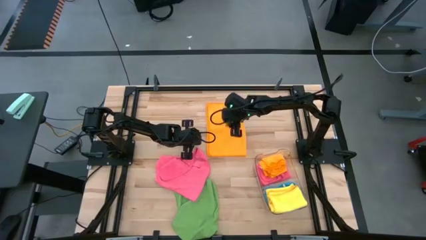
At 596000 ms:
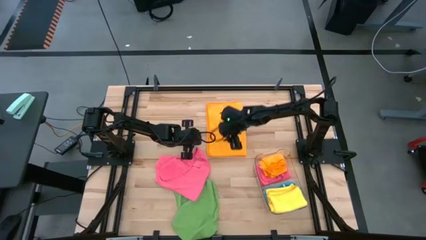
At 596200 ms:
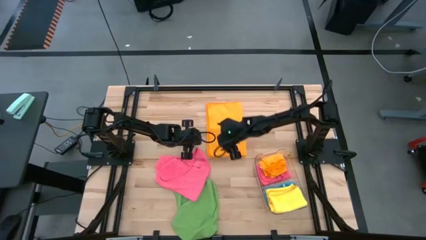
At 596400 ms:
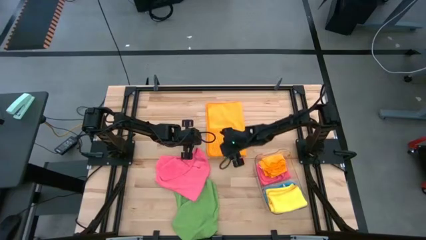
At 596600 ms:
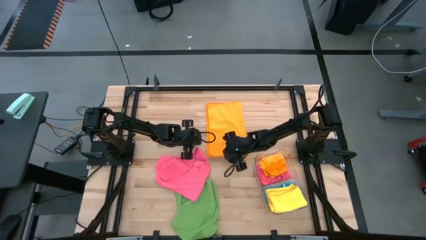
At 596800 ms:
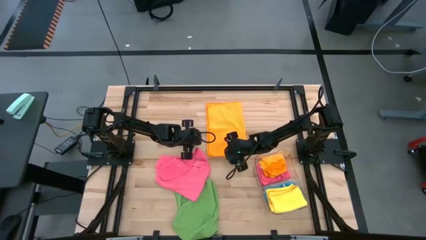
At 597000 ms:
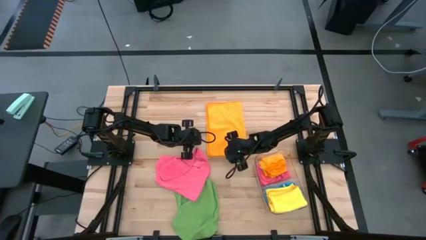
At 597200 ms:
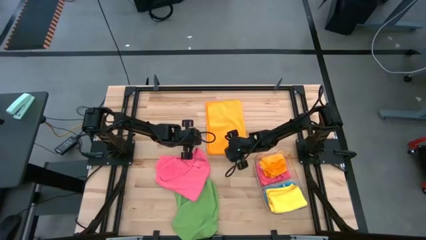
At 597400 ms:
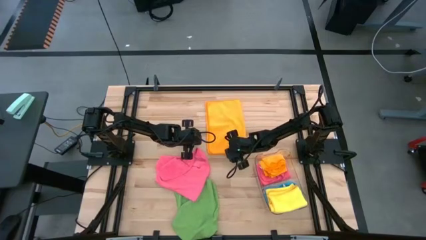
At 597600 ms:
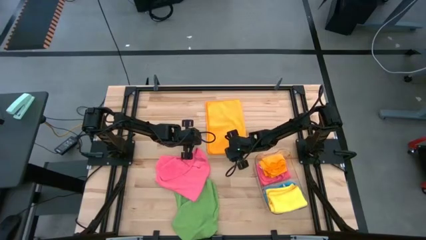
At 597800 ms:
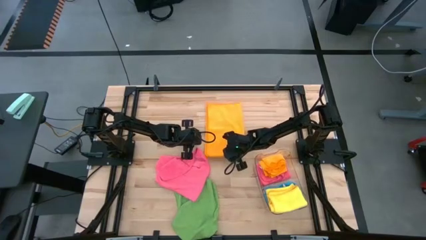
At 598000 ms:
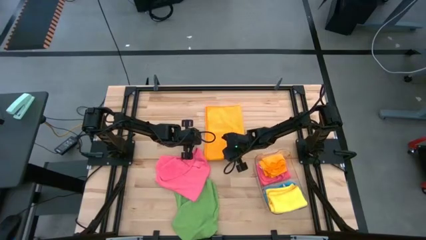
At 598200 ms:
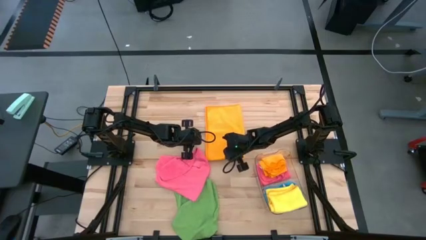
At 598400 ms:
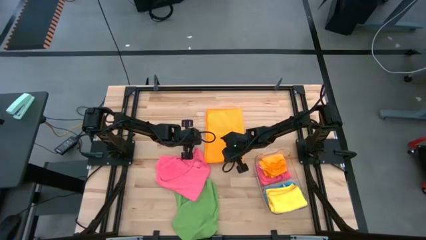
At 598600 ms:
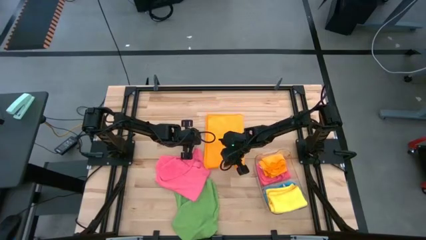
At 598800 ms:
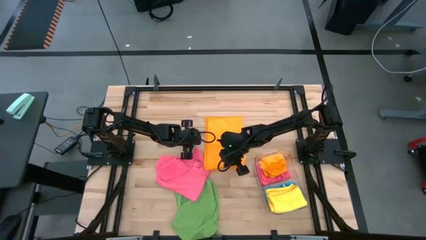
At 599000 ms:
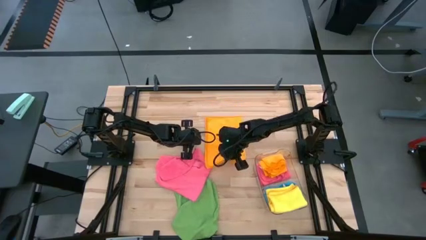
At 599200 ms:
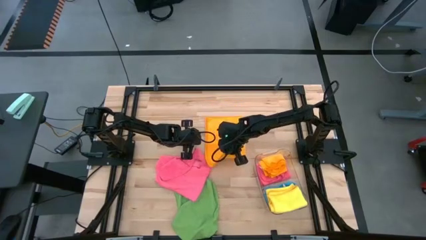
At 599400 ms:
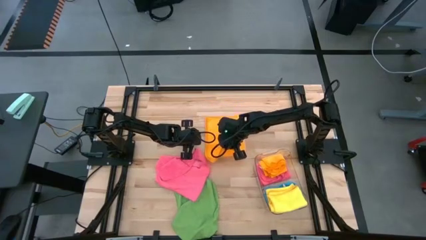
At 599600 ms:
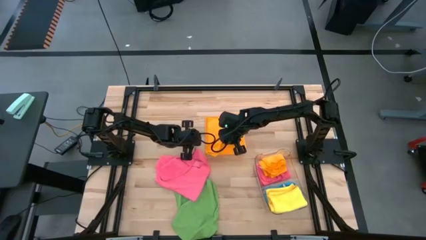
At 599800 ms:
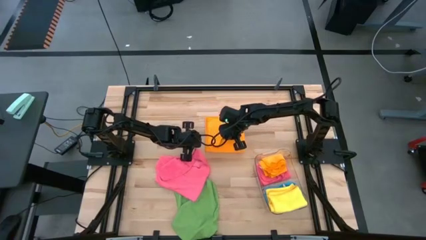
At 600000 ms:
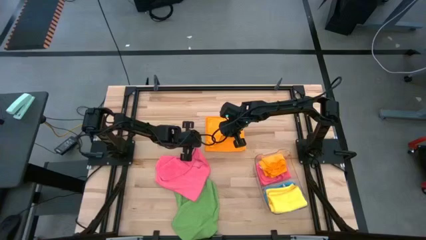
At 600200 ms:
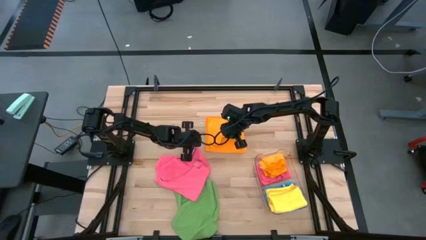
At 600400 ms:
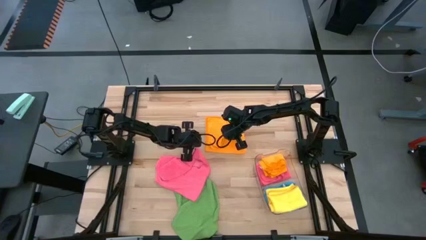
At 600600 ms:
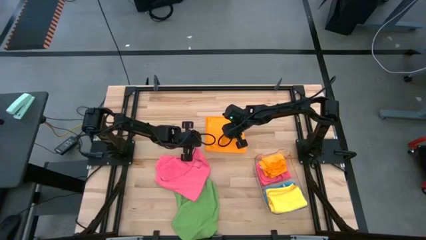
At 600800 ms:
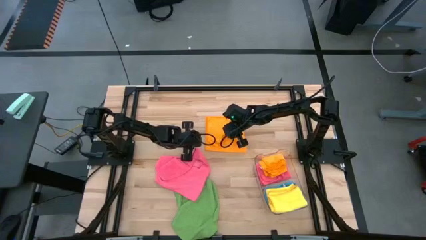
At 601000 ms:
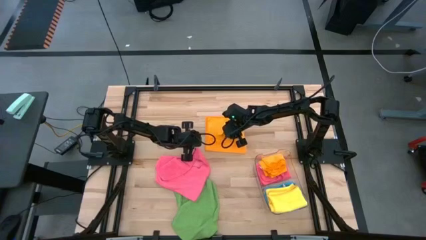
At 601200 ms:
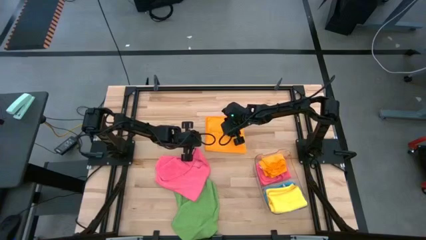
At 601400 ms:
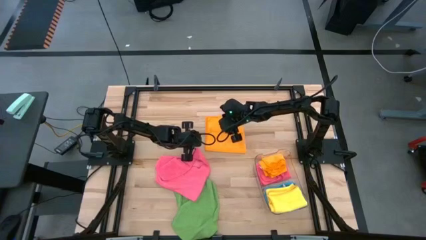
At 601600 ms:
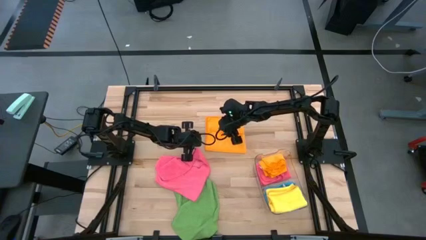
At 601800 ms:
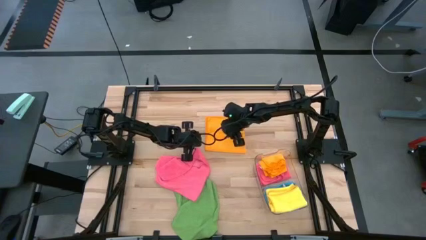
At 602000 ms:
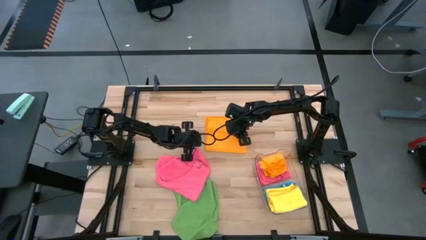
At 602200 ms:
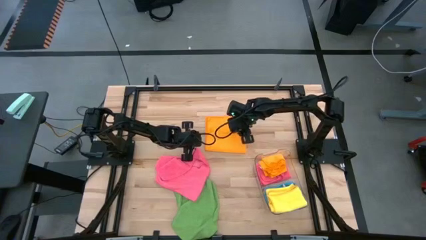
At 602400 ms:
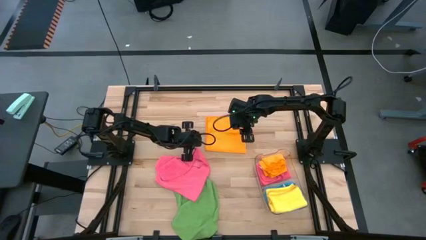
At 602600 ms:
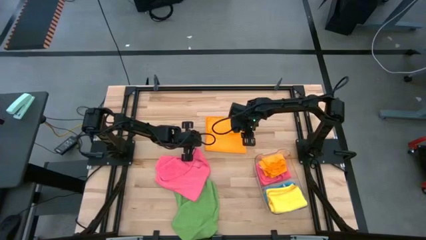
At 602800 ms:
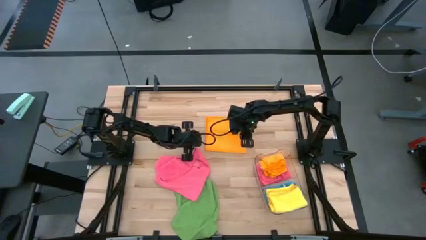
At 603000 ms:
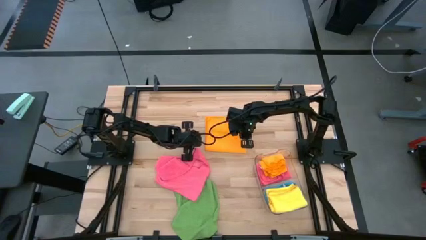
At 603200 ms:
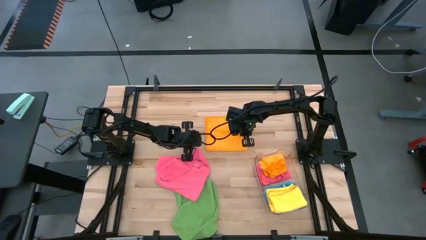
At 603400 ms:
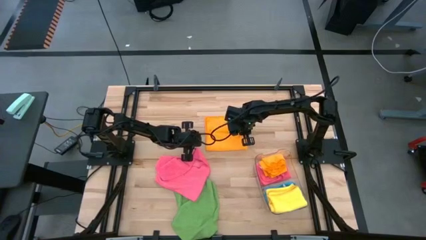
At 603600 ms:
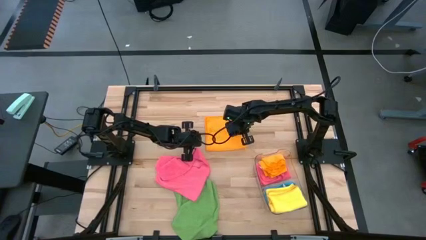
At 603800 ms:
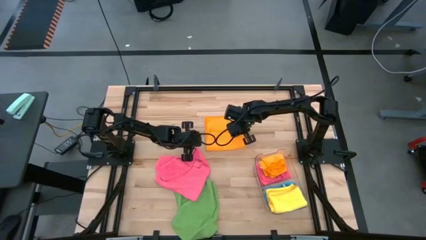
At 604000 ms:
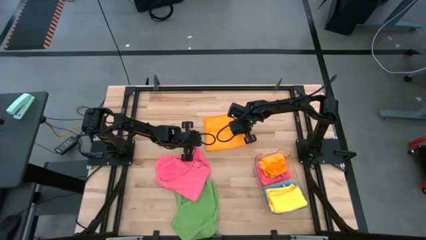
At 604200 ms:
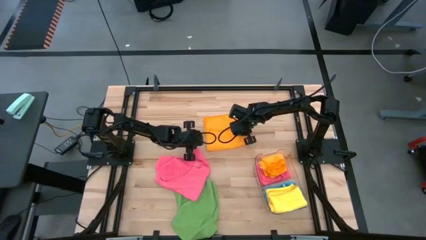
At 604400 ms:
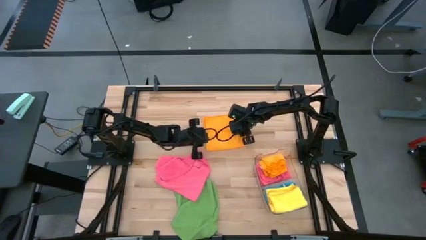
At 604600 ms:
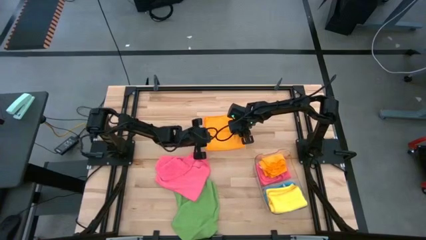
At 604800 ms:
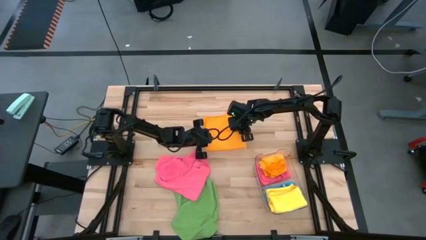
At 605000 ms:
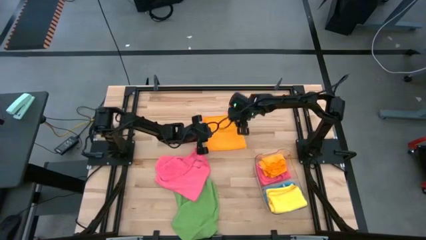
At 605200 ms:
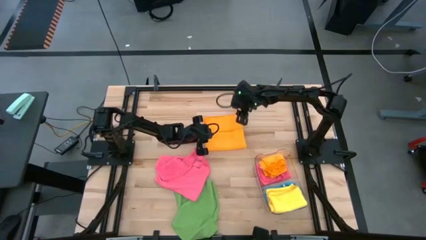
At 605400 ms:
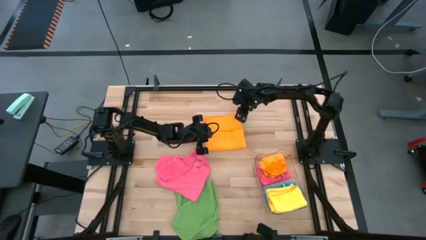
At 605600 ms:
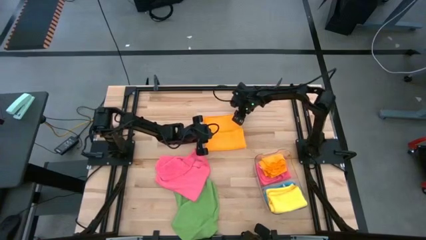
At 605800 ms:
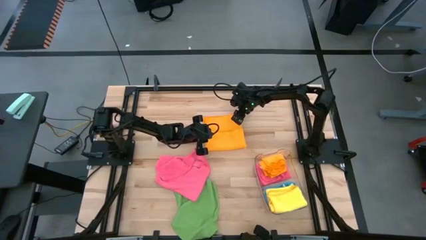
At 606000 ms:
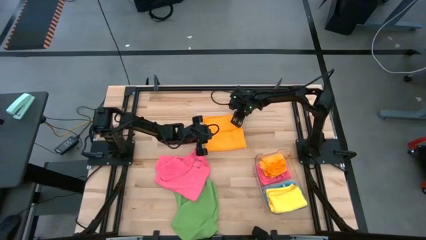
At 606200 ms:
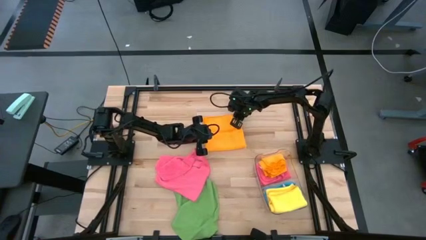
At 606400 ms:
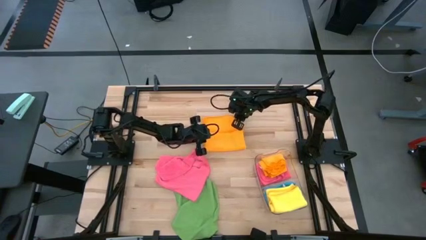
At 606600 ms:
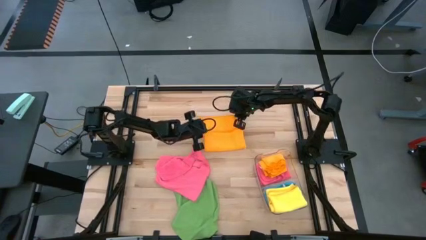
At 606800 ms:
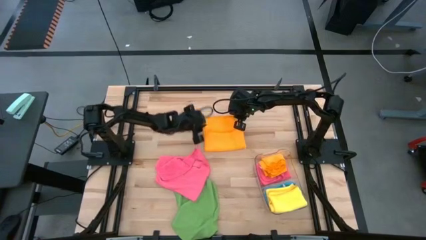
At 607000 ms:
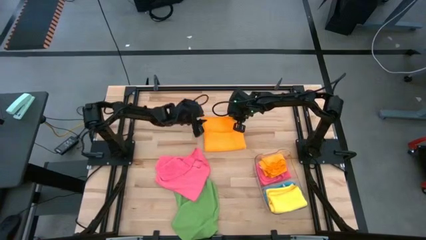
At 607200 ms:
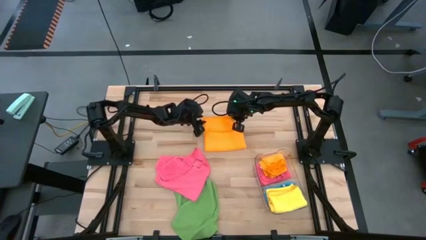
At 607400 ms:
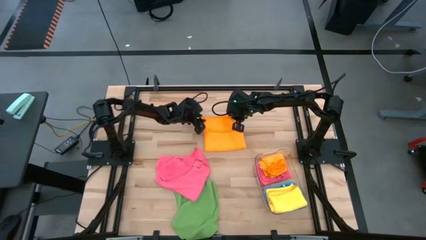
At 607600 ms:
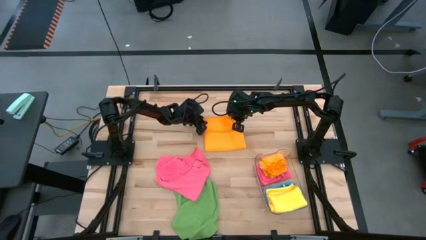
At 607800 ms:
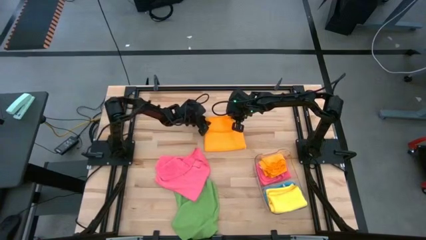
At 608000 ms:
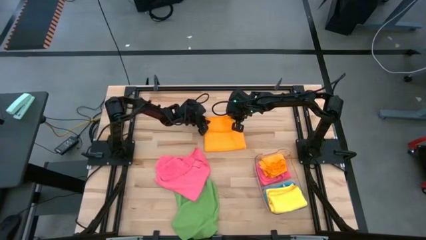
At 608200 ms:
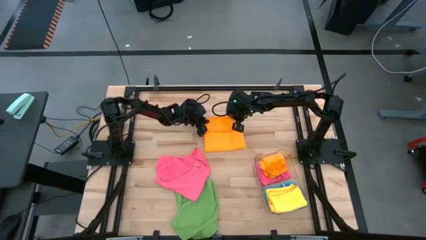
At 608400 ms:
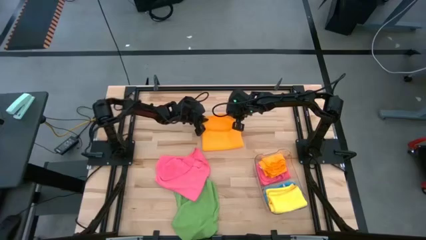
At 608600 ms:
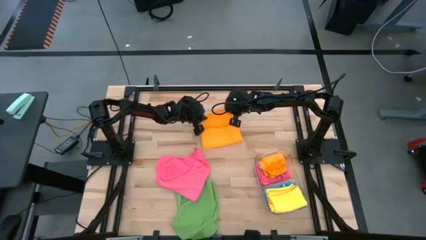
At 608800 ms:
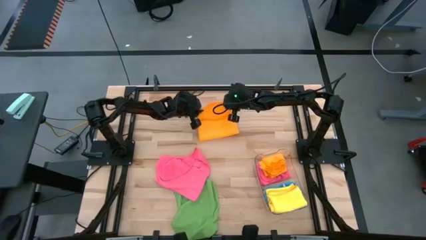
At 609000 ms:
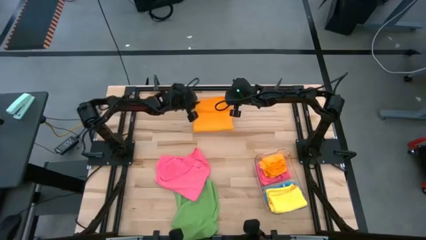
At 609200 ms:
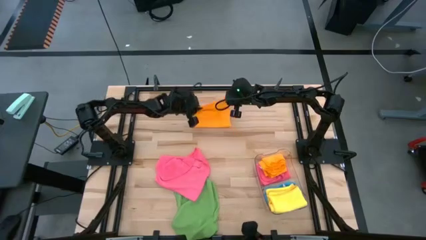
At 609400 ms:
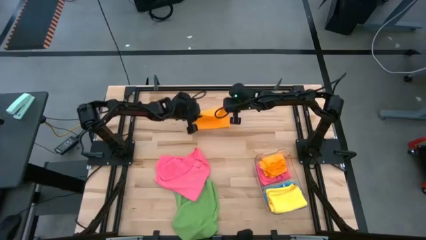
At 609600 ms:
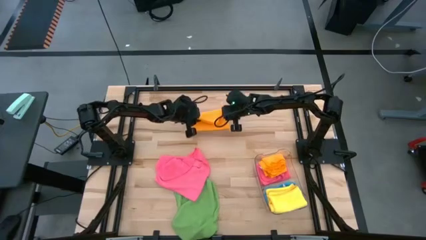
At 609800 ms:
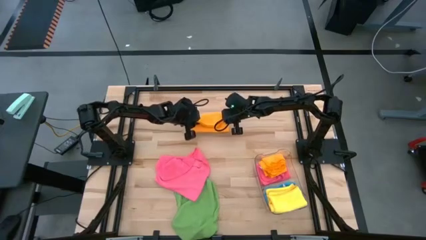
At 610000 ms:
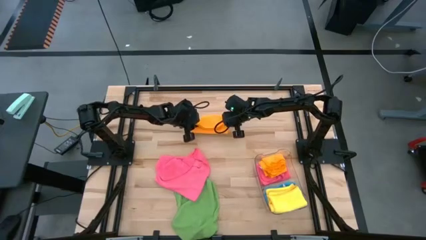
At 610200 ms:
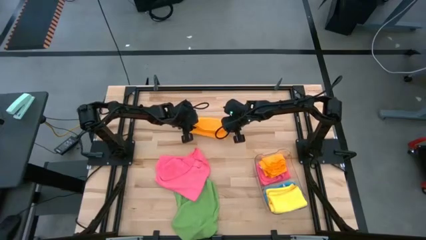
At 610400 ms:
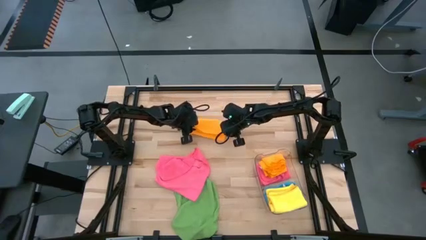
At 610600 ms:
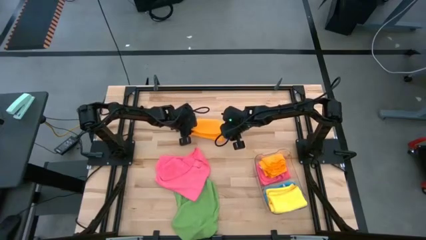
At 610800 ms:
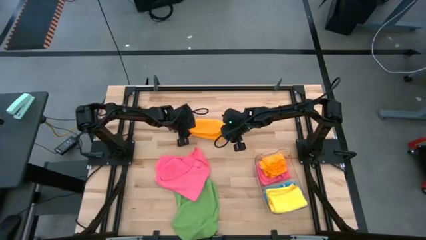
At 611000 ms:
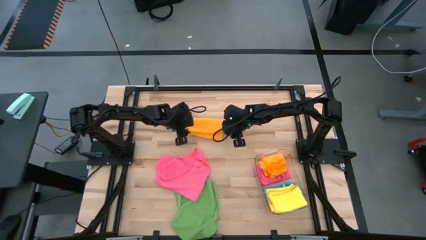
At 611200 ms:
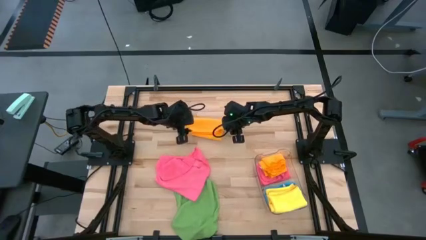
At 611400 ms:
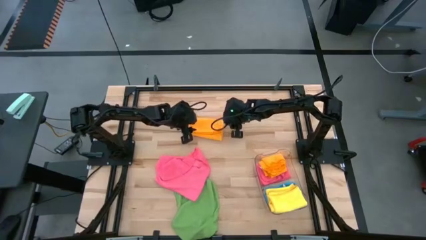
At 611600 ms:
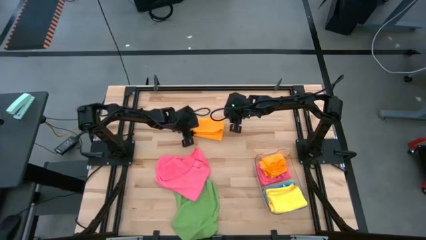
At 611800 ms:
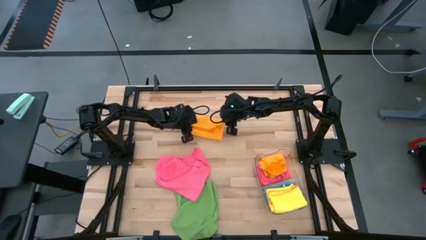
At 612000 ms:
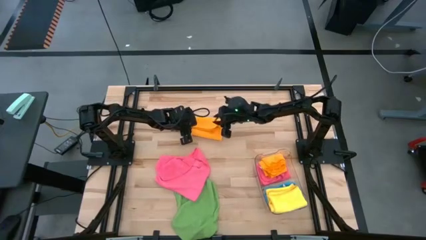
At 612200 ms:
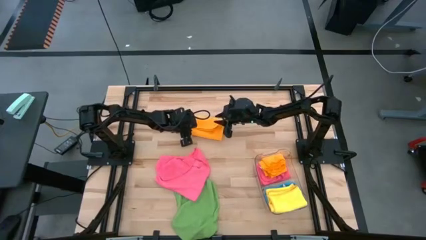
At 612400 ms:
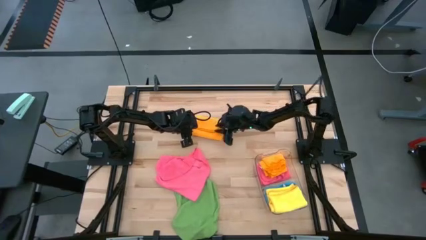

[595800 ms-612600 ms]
Task: Fold microfiber towels
Fold the orange towel
